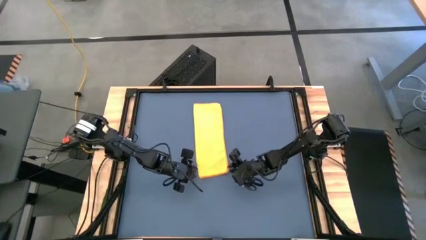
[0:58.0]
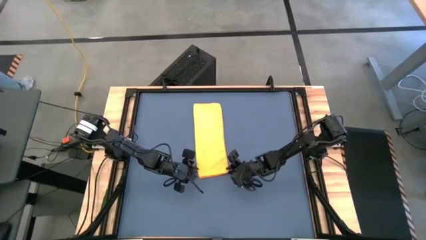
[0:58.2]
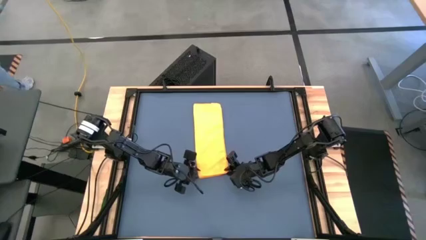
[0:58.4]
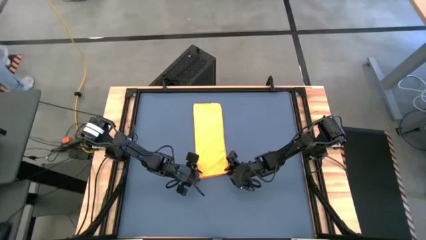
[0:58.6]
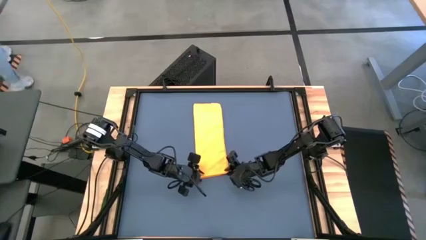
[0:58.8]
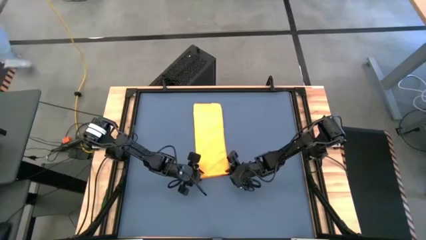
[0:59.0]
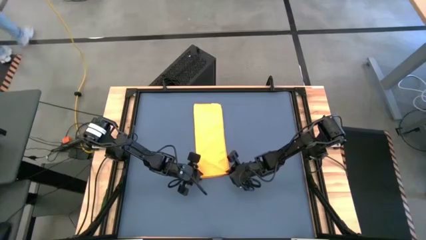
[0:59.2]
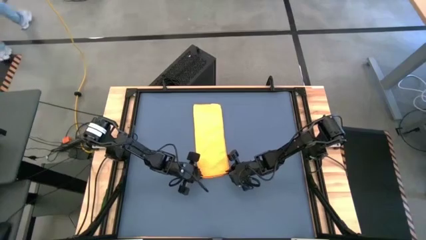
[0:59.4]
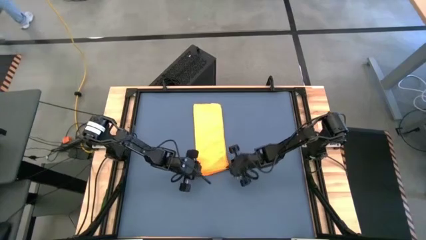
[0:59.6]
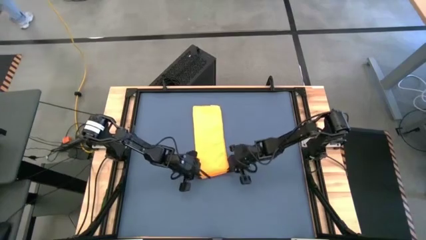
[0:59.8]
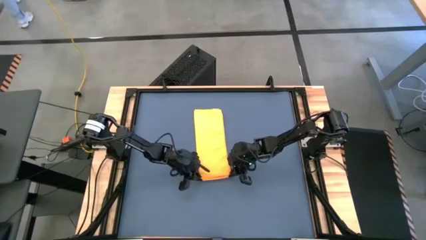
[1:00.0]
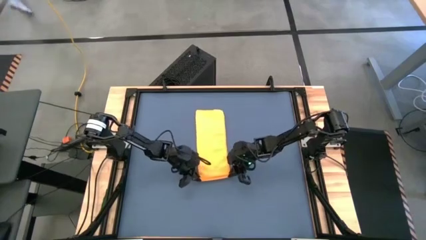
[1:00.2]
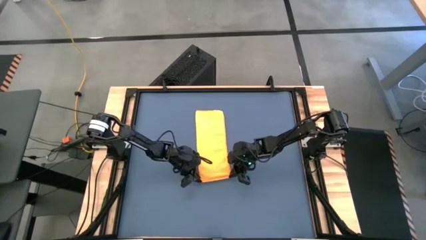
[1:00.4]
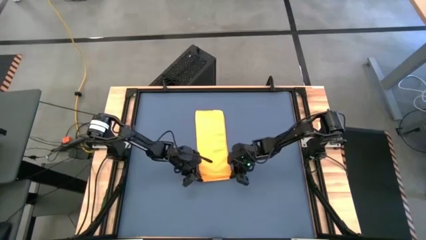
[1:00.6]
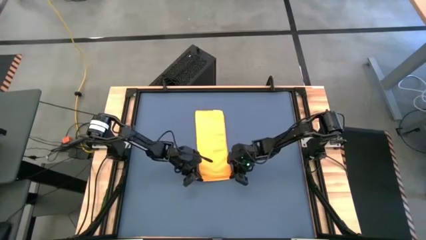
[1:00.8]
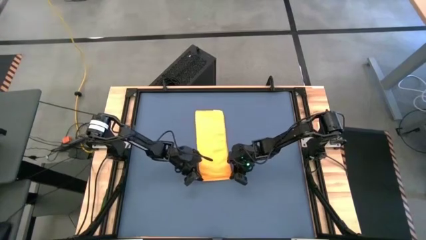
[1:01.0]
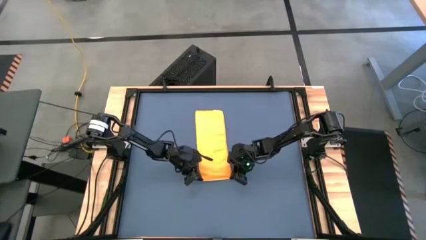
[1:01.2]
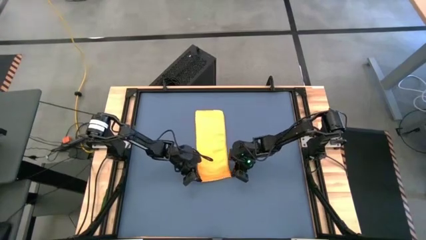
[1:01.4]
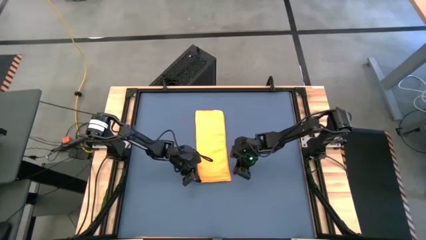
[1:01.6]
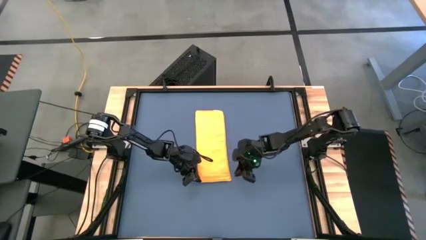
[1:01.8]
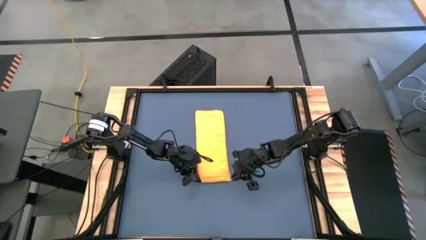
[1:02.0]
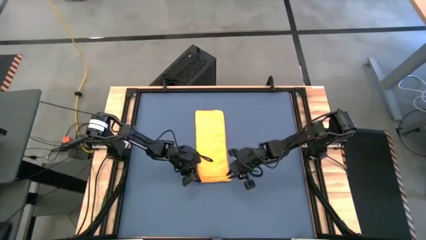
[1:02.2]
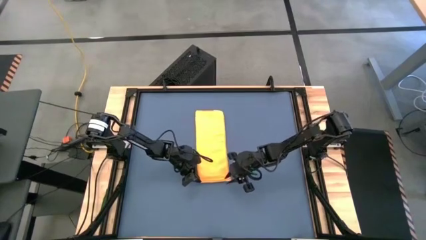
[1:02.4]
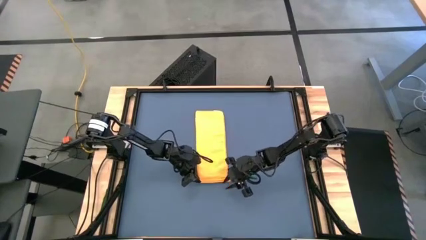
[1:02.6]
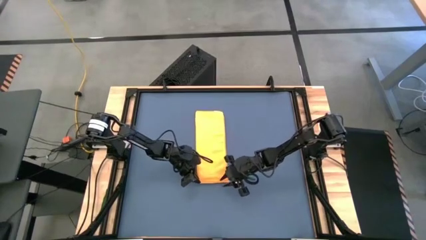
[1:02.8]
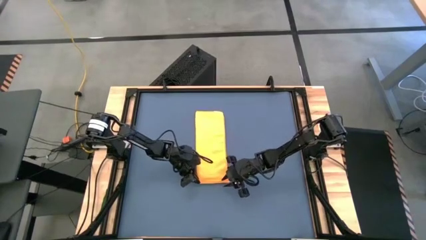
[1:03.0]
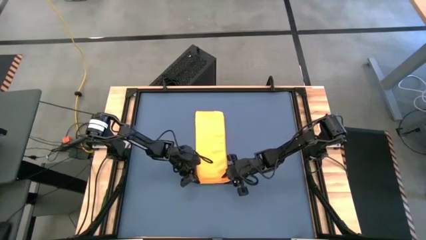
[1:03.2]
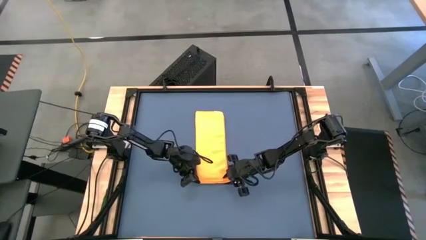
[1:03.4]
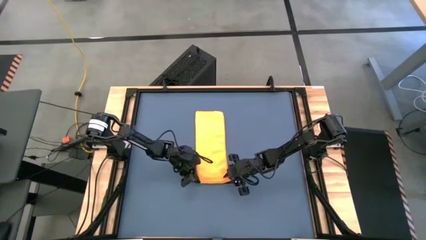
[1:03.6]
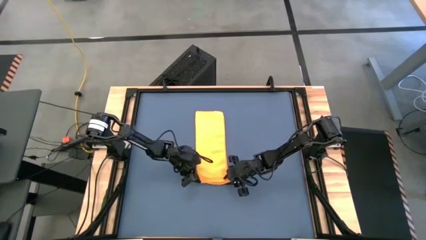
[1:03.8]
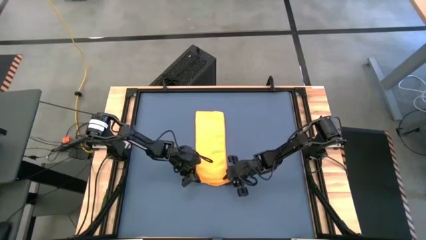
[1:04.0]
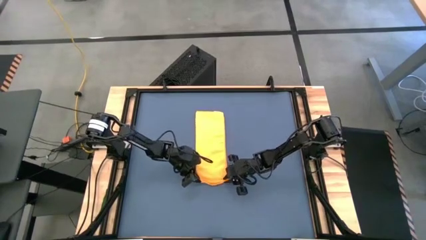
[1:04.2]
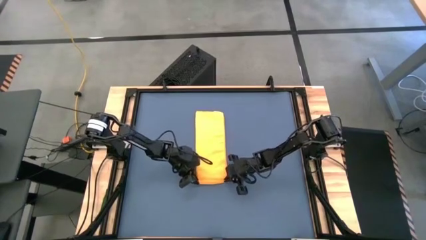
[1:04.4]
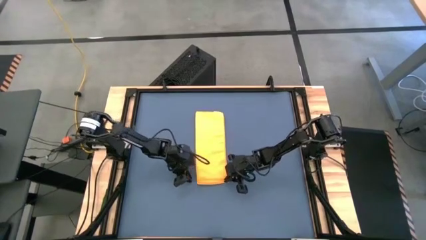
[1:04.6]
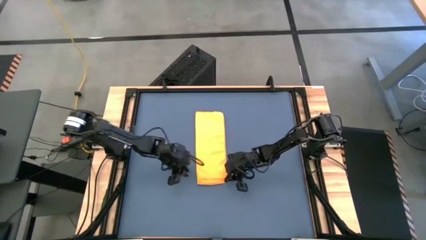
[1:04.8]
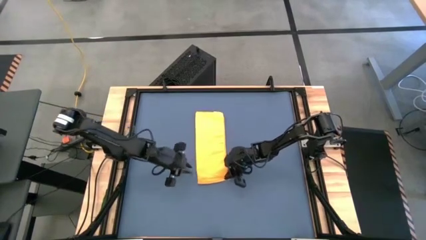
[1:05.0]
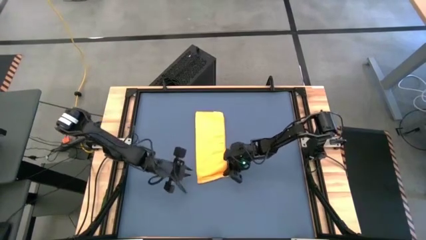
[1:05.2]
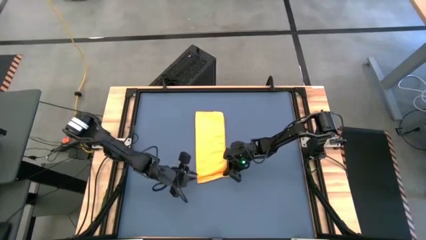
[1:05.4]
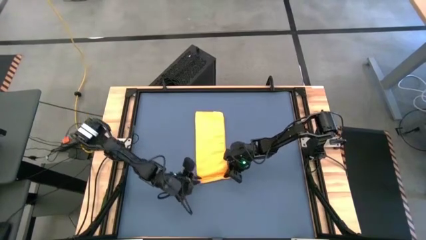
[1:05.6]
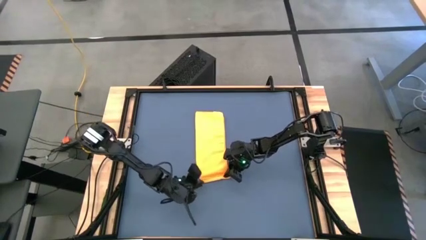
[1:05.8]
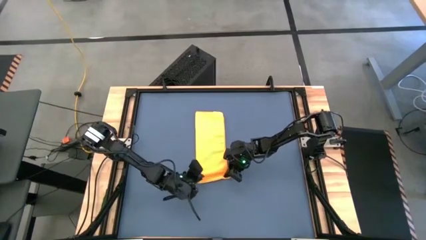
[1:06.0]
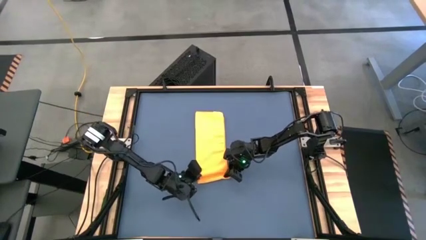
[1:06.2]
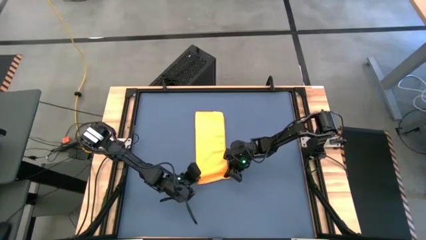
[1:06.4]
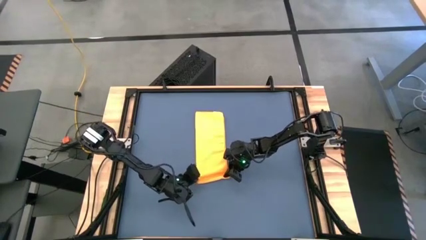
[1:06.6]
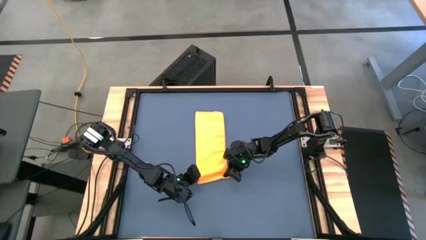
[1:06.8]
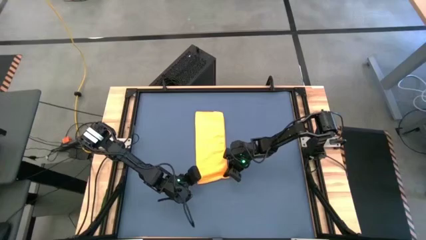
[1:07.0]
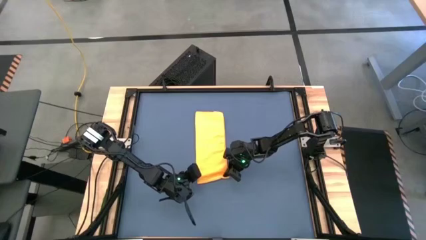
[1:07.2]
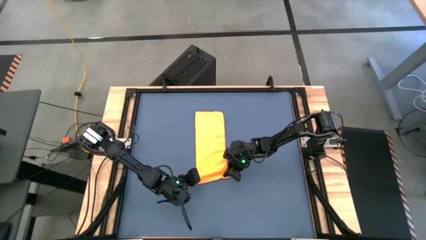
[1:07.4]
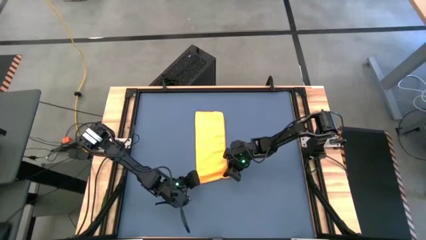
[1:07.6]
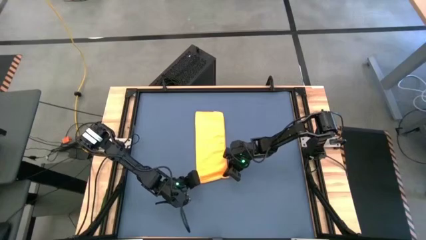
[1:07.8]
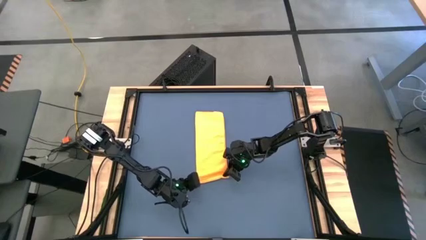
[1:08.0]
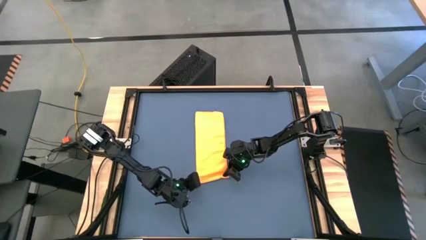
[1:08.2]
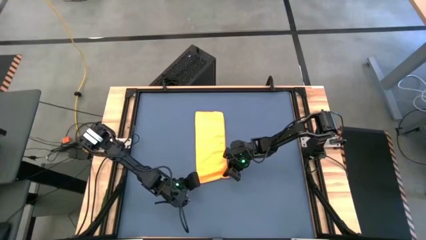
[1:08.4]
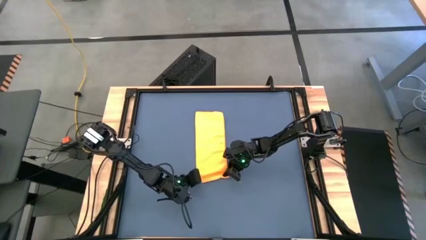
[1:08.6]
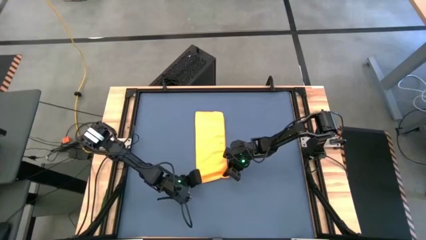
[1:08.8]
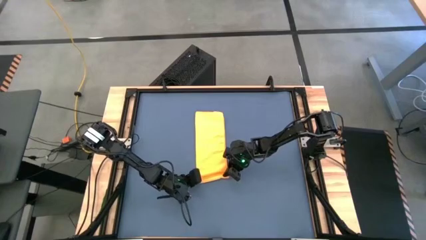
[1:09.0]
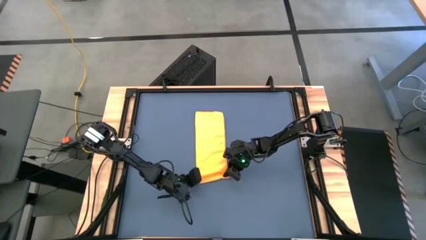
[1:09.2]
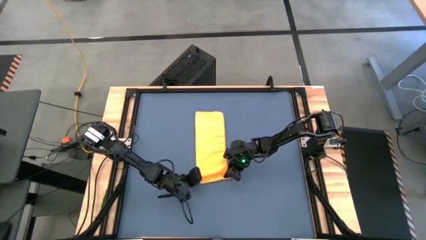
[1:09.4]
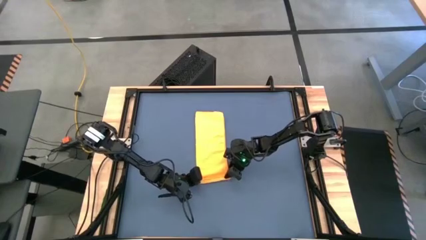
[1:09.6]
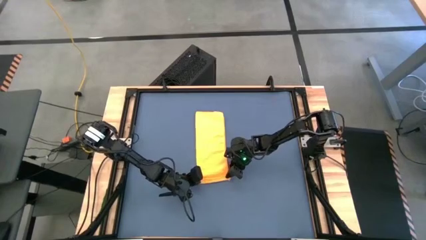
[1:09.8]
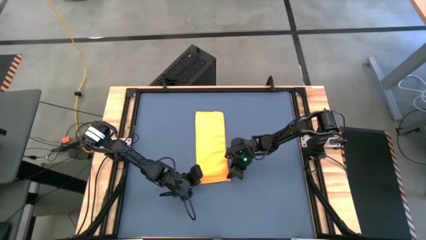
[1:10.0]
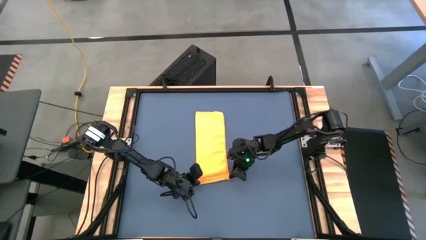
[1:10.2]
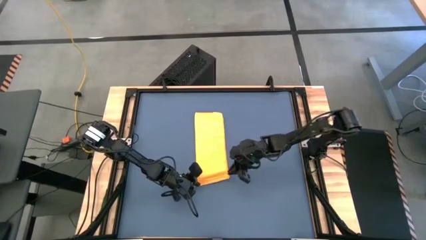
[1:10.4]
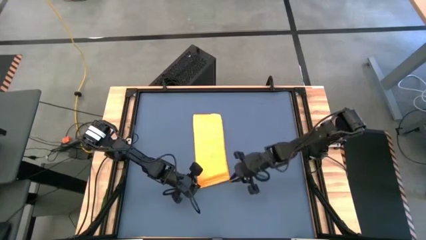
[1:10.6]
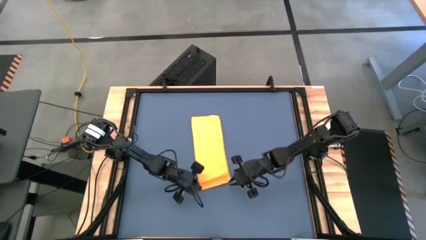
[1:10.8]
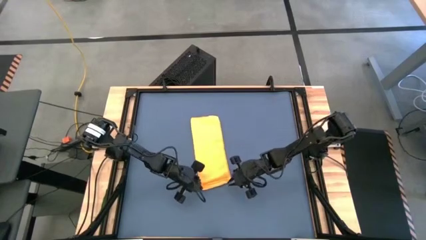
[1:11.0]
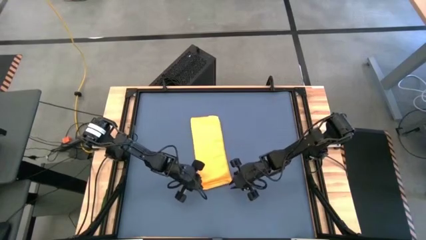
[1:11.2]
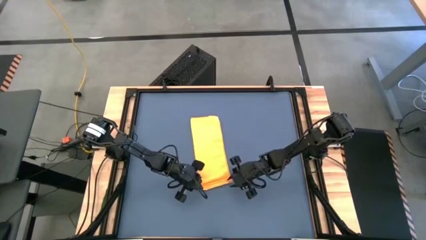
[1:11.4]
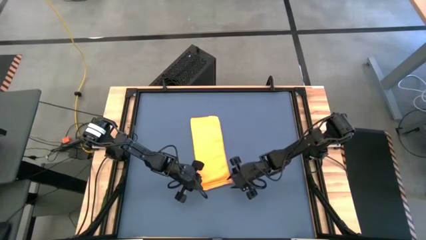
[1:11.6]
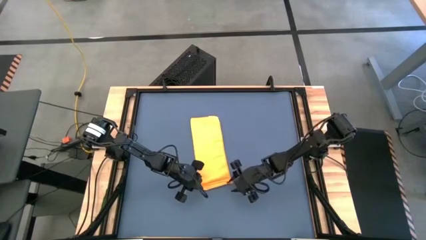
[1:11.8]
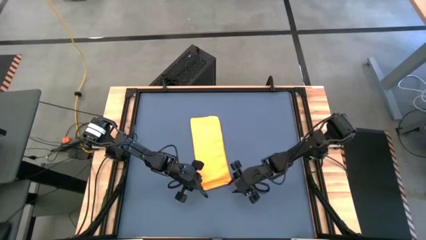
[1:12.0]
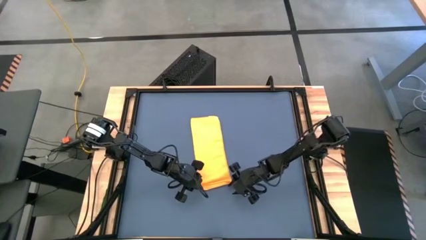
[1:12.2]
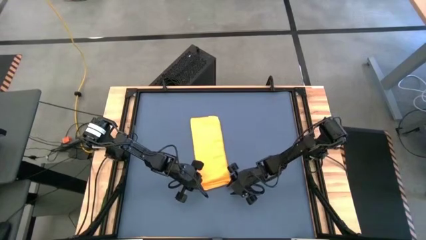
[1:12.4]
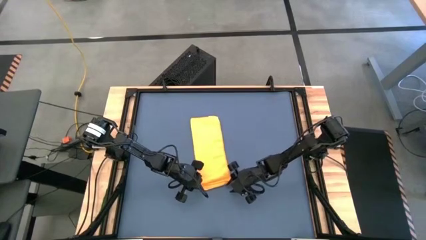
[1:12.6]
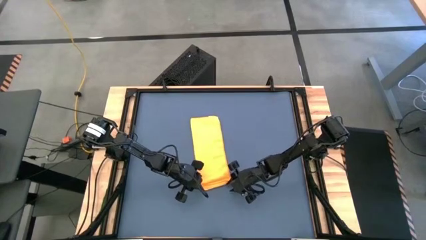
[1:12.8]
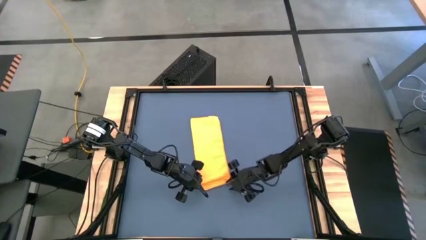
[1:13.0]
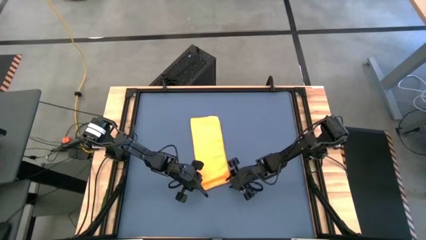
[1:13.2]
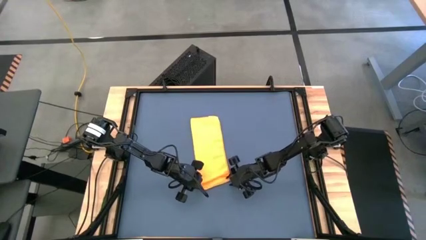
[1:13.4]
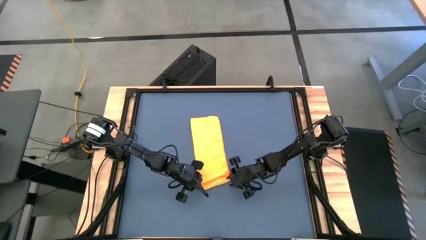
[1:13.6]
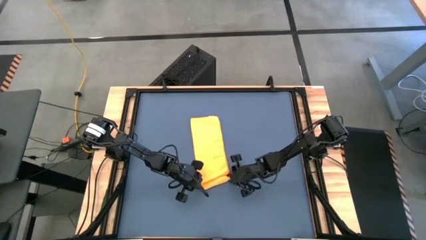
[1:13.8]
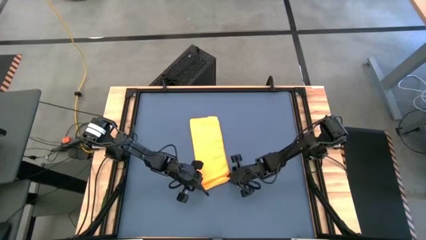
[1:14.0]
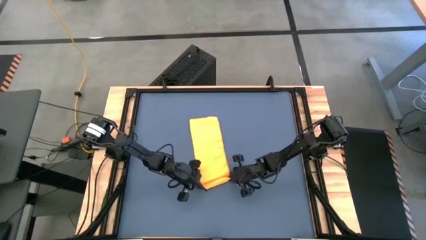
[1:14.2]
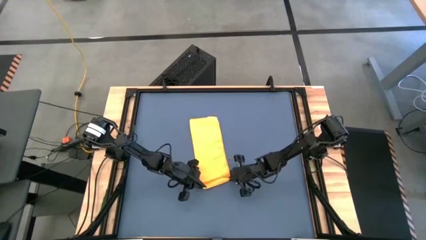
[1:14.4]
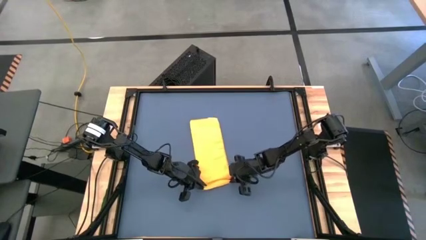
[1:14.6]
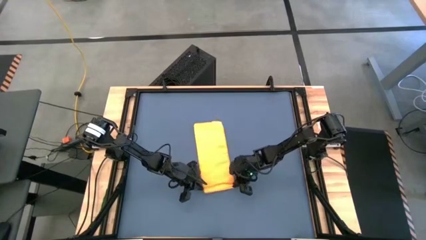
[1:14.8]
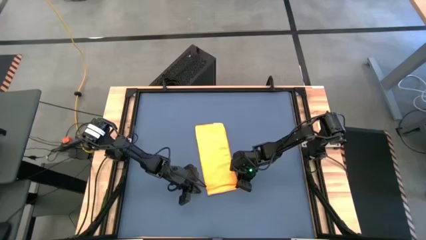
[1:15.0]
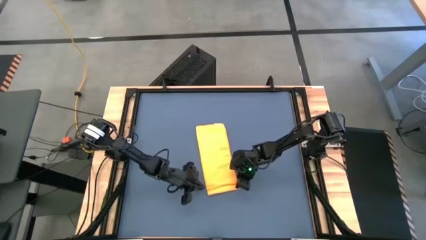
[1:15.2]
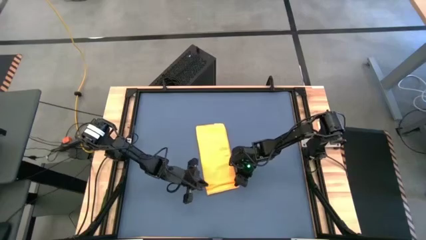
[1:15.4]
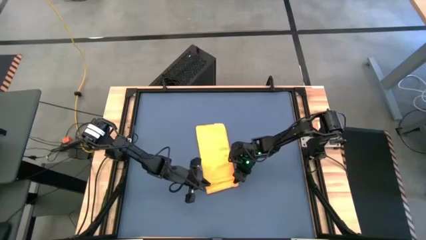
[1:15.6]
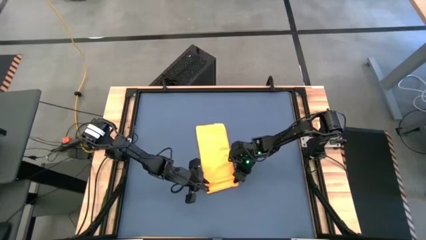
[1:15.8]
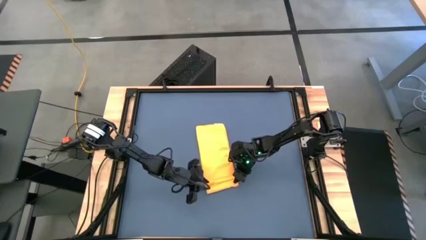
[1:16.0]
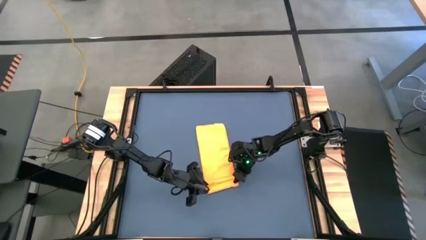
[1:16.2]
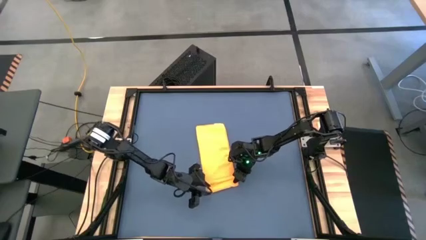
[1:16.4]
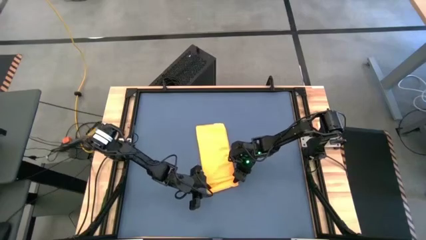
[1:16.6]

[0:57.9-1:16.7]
Task: Roll towel
Roll the yellow microfiber towel
